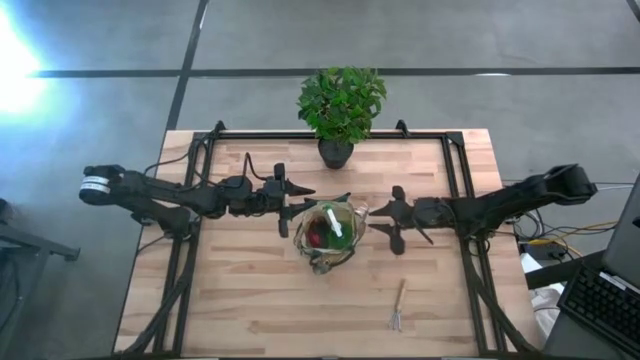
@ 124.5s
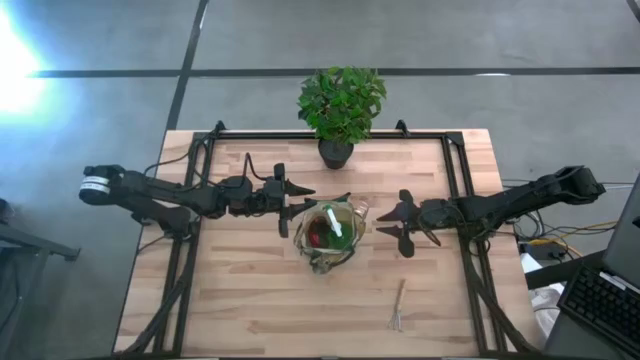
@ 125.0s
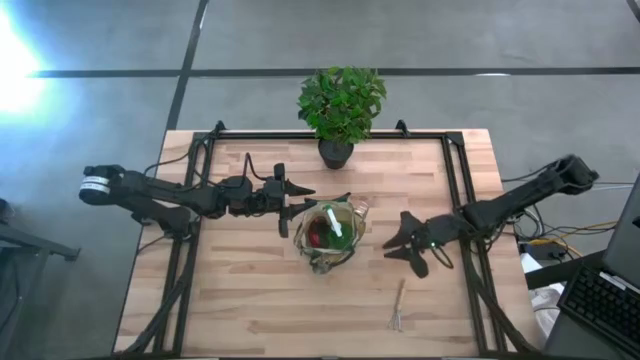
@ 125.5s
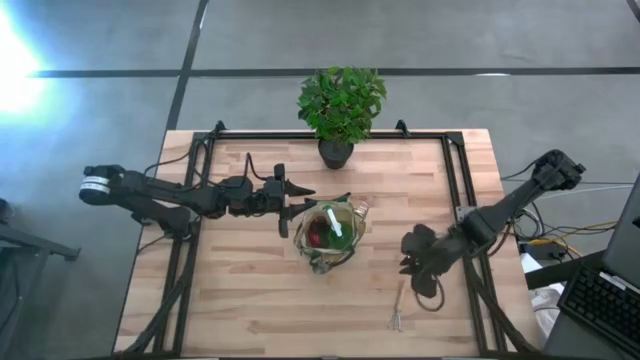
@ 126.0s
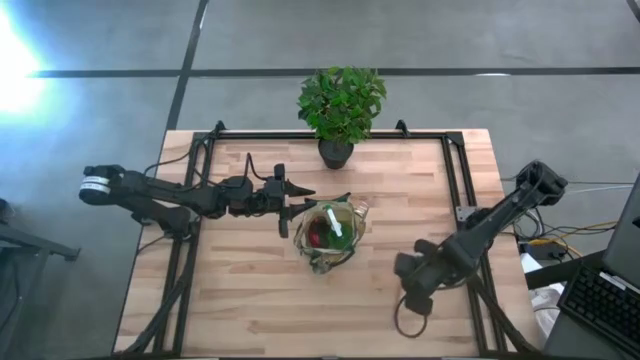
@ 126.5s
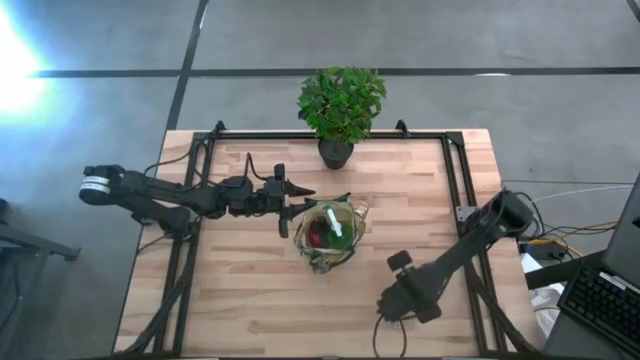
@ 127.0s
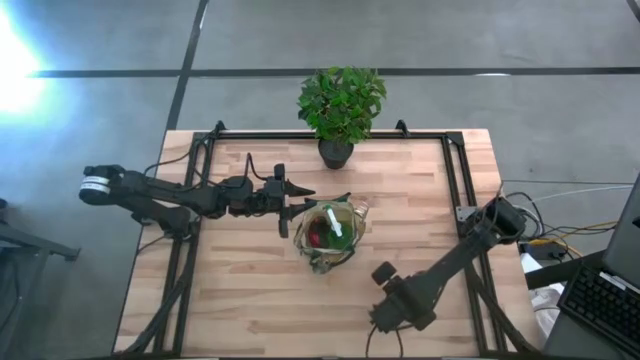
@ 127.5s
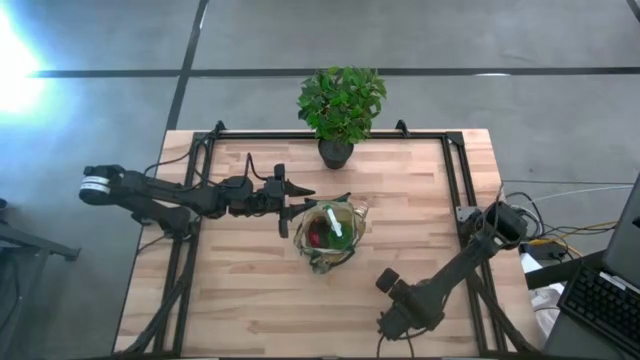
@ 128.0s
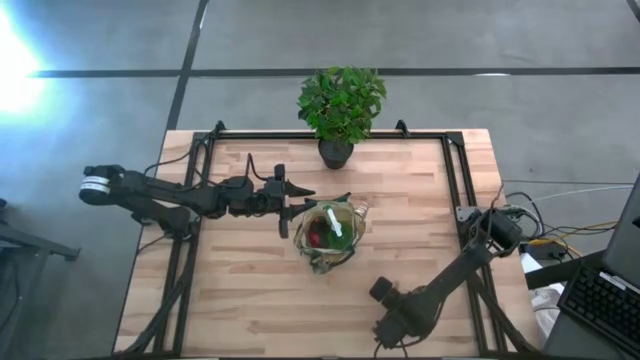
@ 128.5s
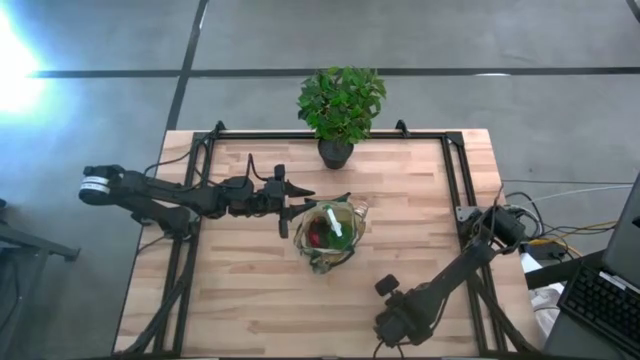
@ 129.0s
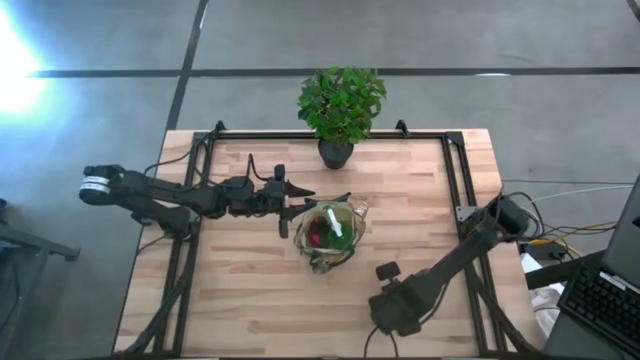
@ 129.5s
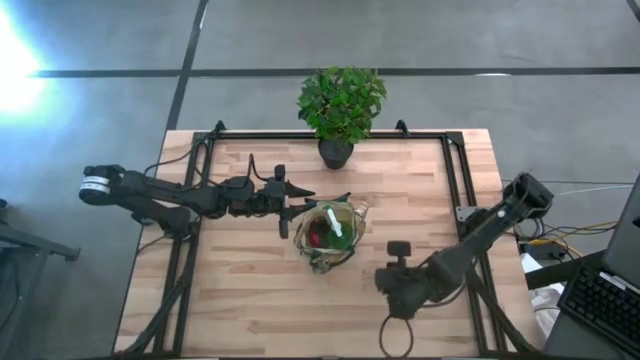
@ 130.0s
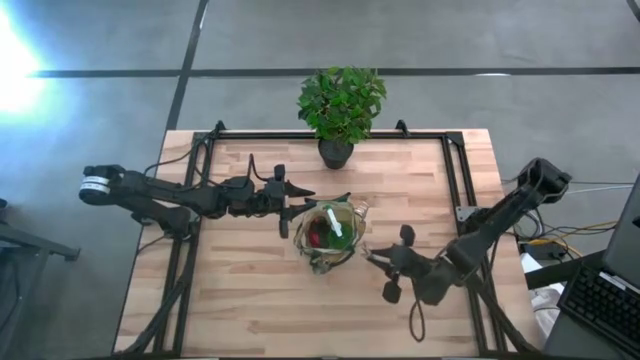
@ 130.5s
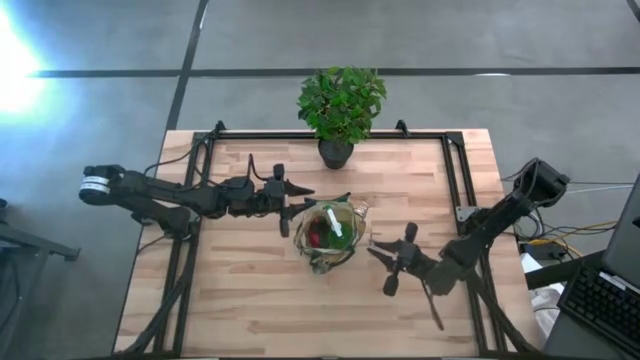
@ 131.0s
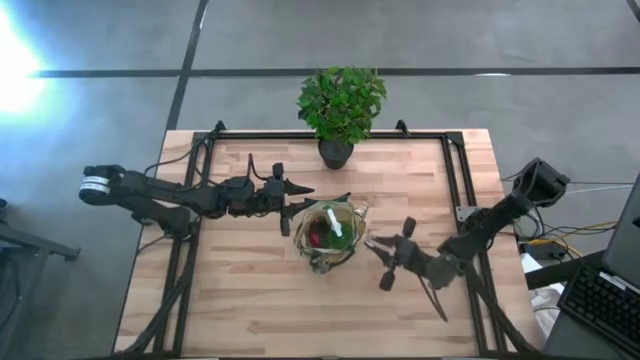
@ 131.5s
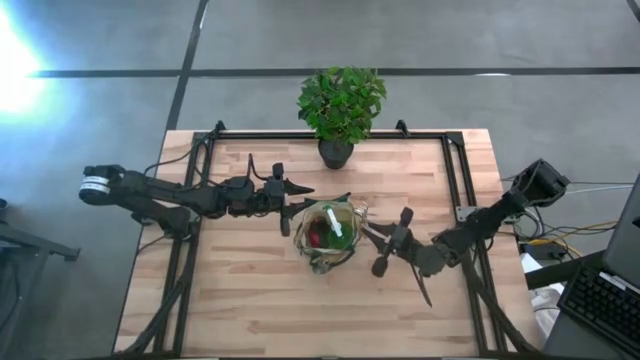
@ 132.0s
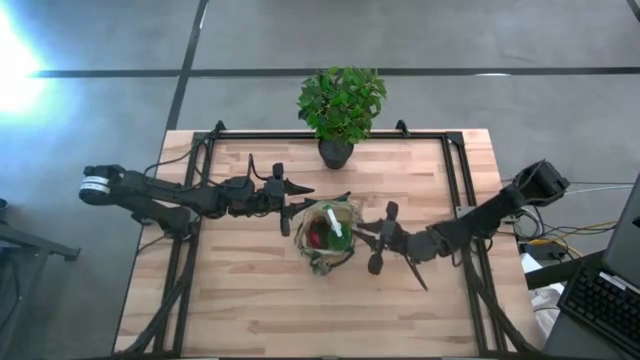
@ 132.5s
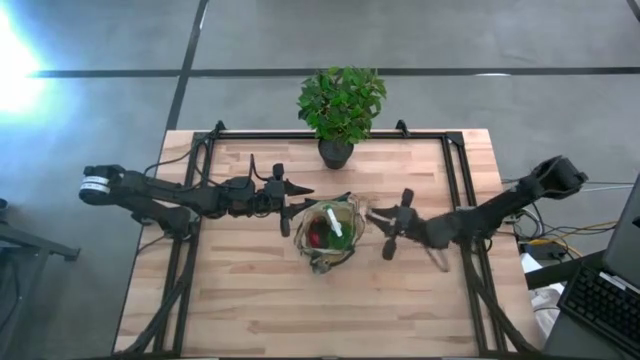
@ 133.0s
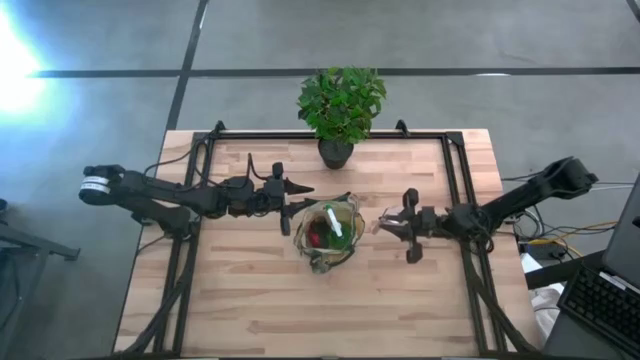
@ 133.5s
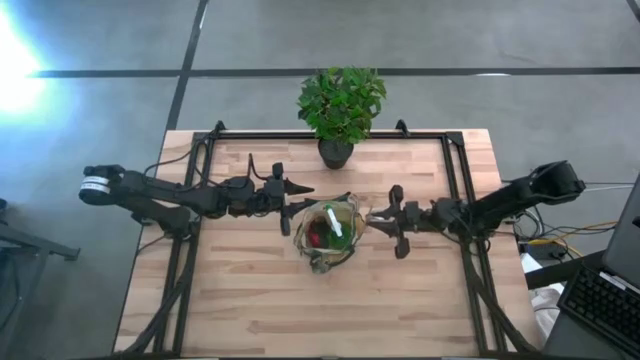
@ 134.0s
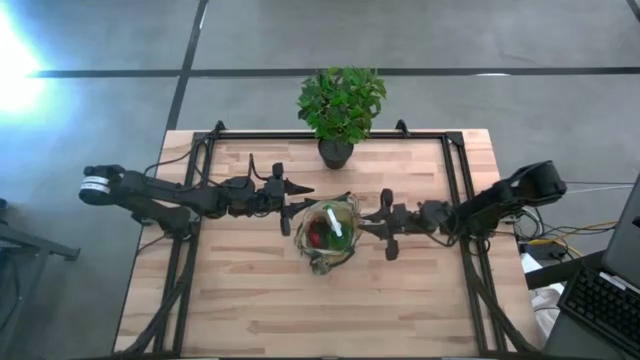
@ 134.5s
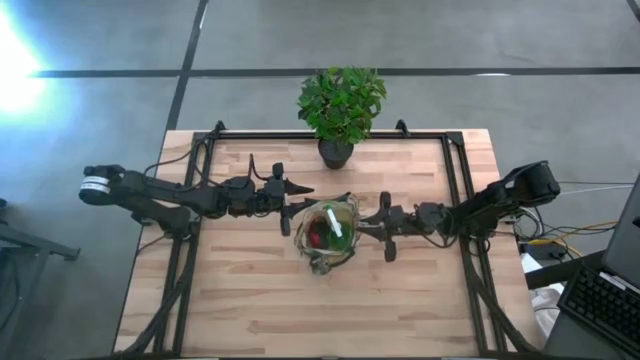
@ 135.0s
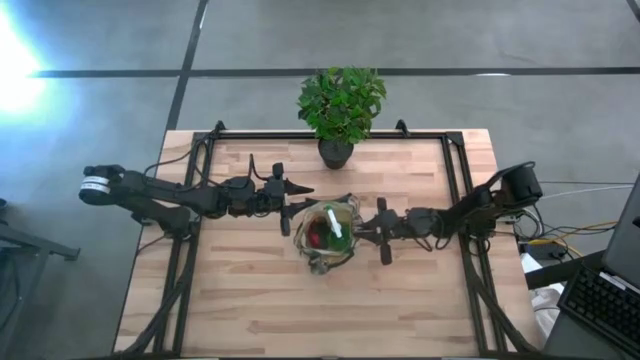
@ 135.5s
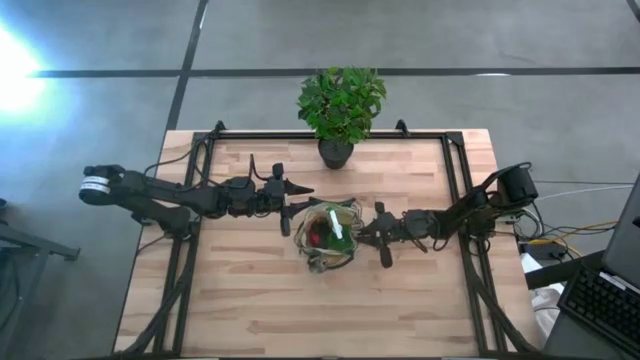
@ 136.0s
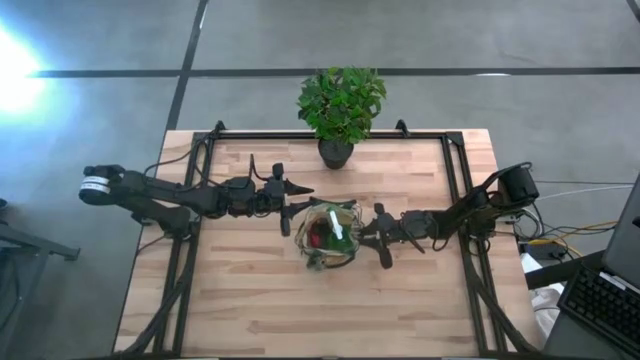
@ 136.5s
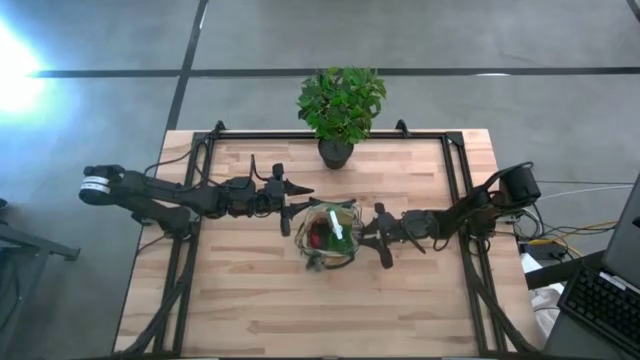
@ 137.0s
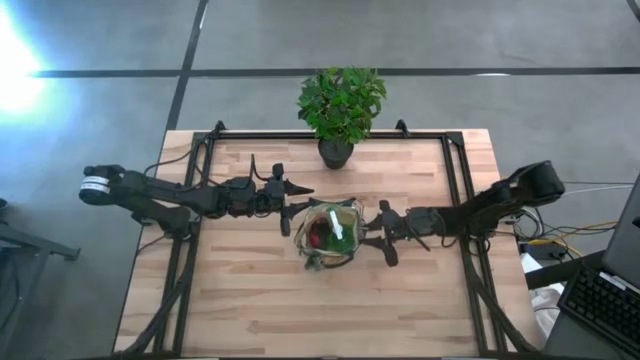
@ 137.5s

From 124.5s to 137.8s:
Task: Pick & Place Garden tools in Gardening bag
Put the brown hand rake into the side pocket of the gardening bag

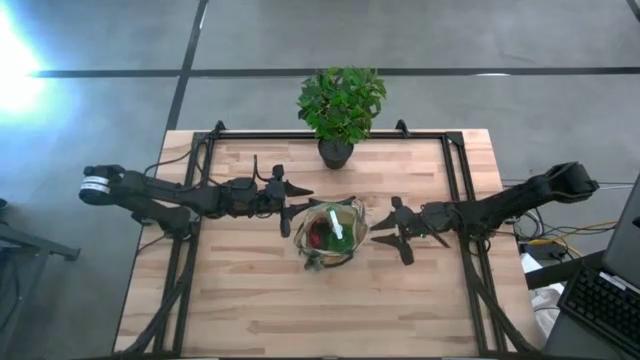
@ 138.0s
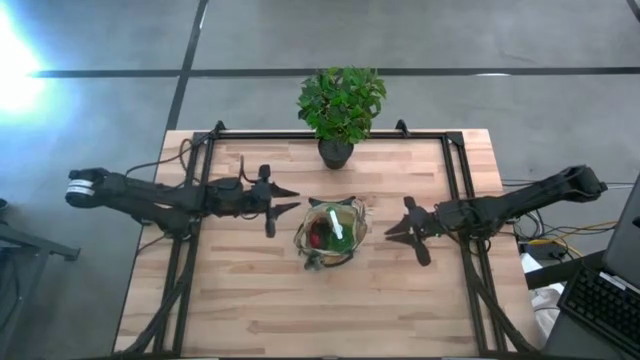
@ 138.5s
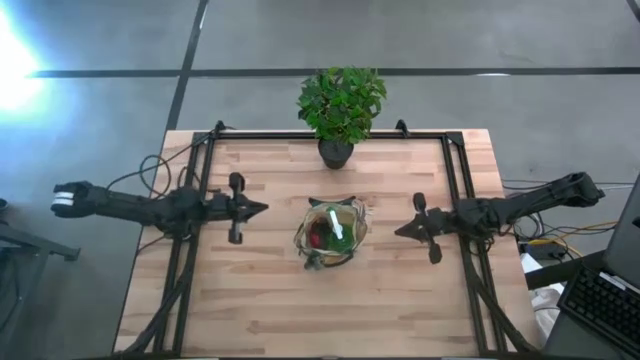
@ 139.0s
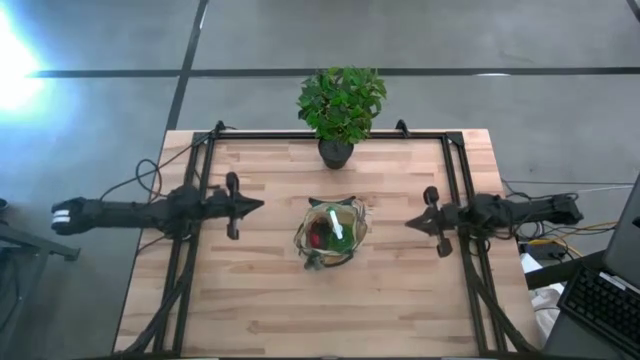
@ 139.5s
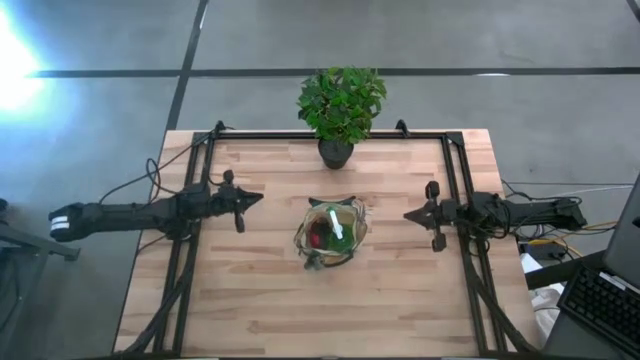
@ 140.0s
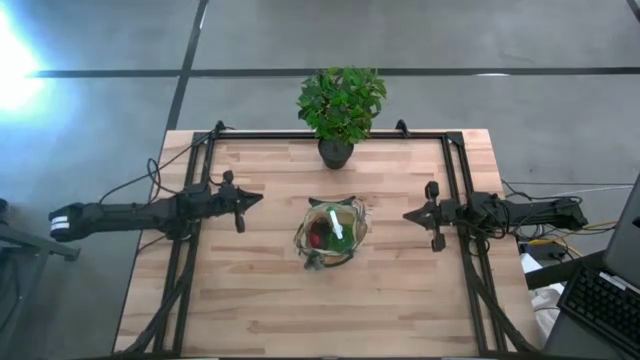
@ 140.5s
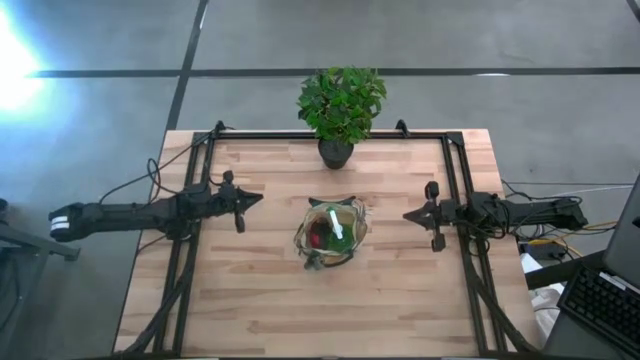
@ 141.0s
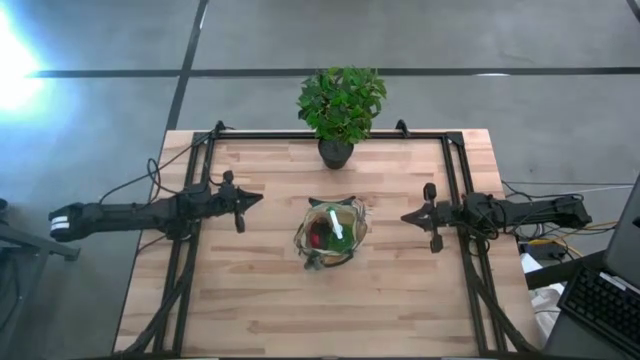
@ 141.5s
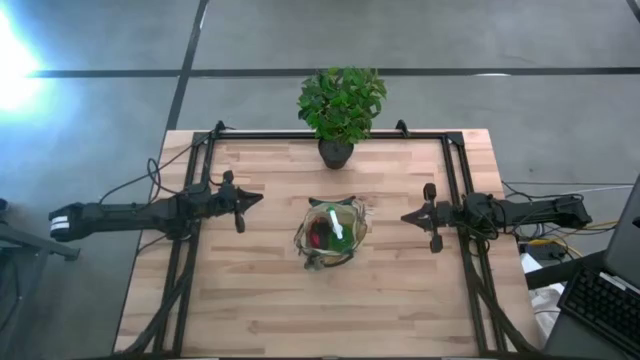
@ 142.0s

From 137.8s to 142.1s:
Return to Home Position

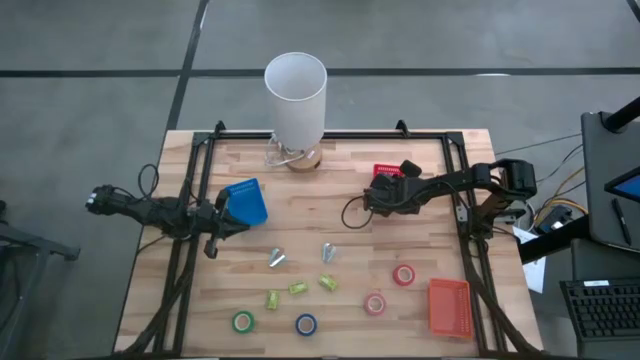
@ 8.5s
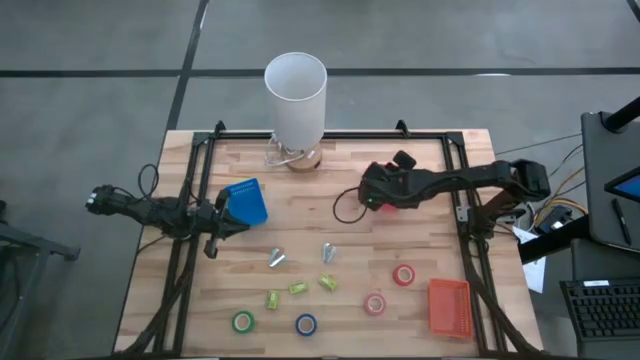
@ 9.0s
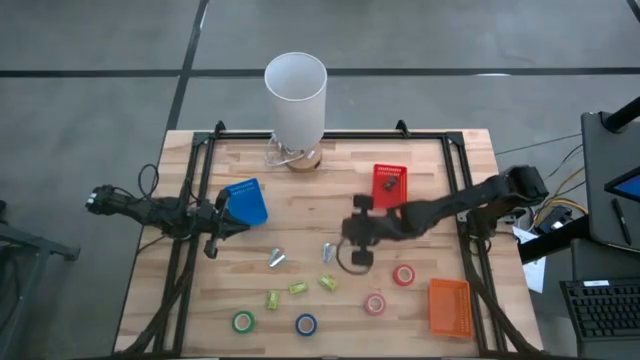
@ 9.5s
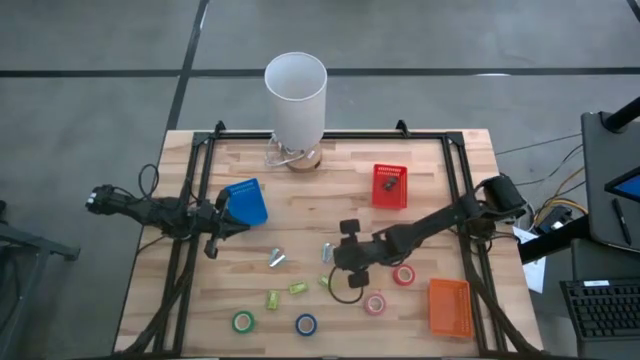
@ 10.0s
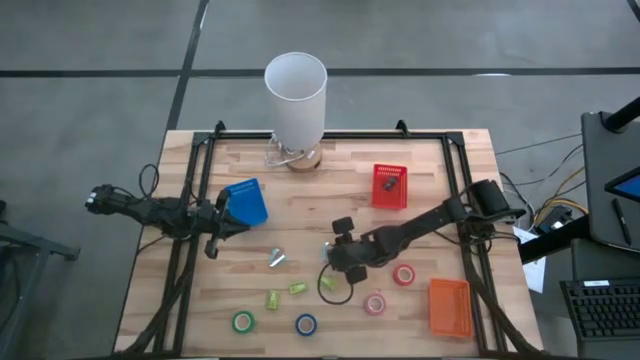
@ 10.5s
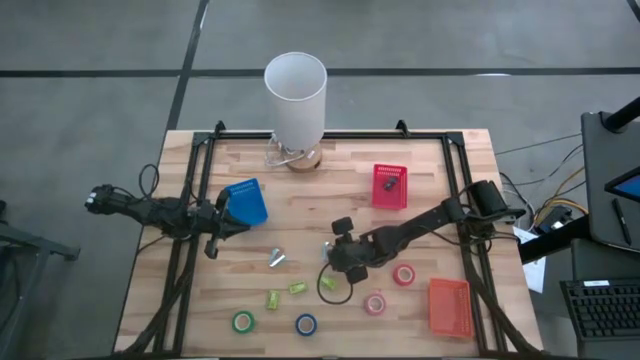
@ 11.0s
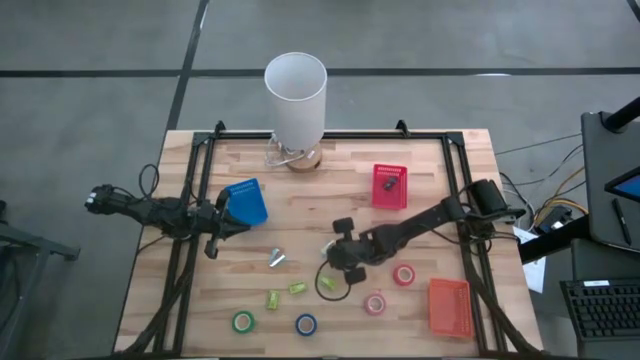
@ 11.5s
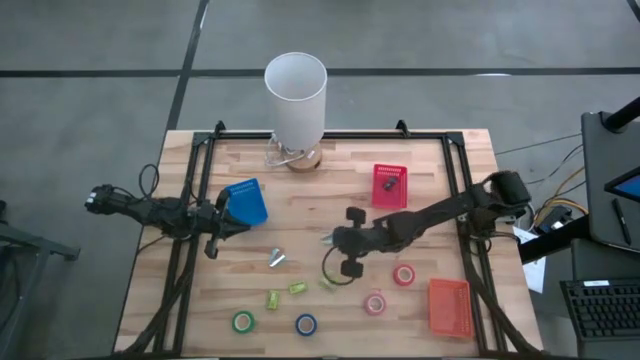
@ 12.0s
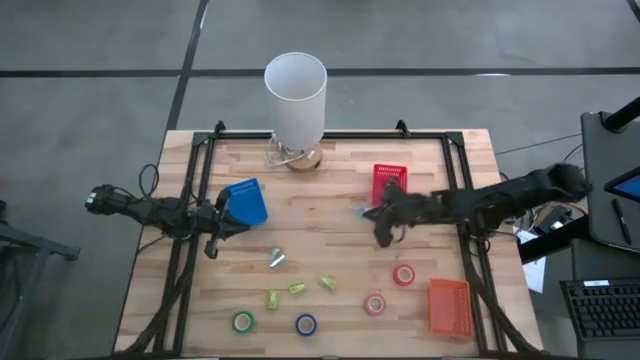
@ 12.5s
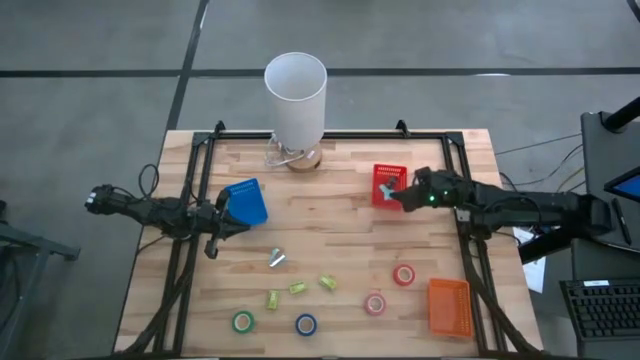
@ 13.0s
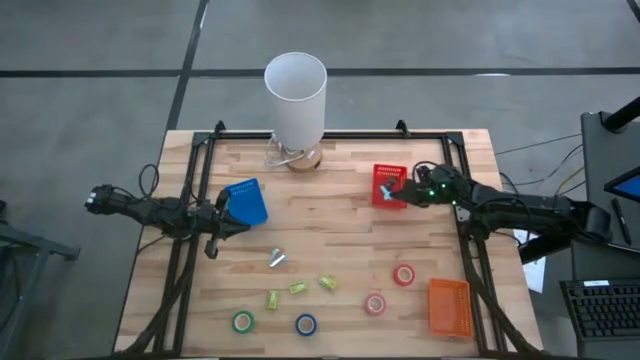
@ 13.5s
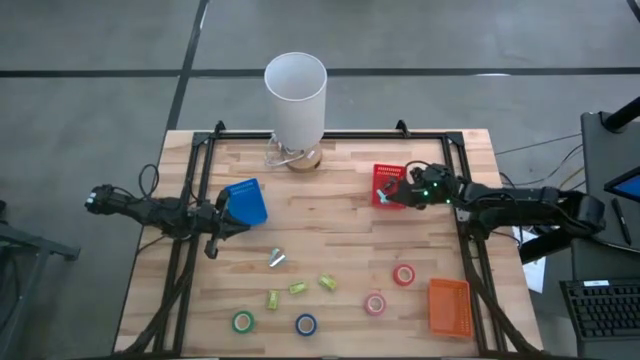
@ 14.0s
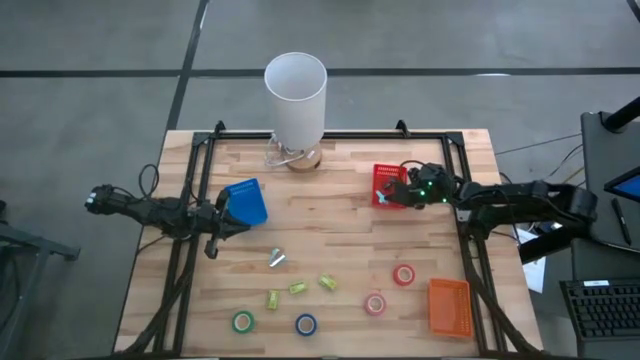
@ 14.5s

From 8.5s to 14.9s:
Task: Pick and place Stapler, Stapler remover, tape
Put the blue staple remover into the red basket
